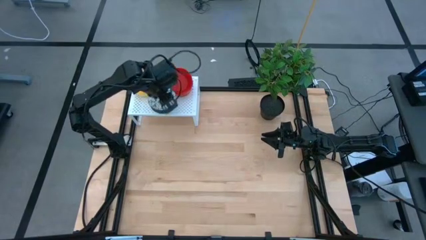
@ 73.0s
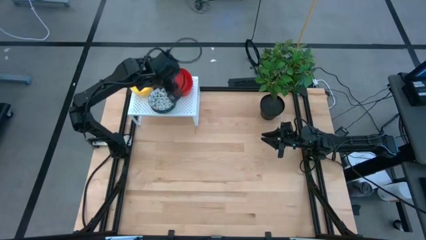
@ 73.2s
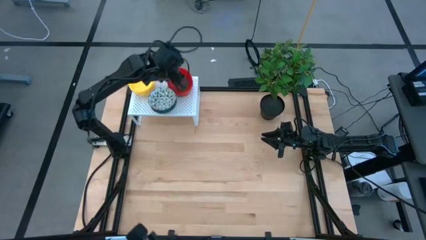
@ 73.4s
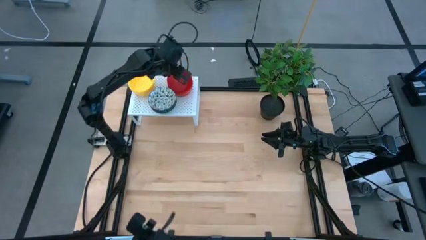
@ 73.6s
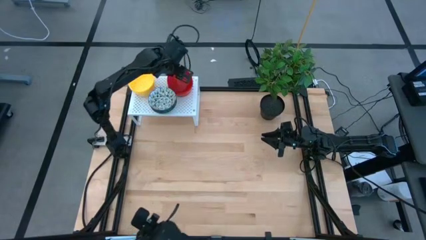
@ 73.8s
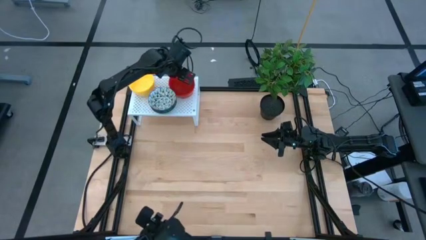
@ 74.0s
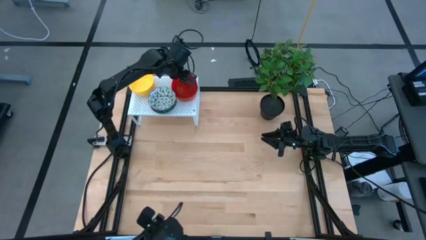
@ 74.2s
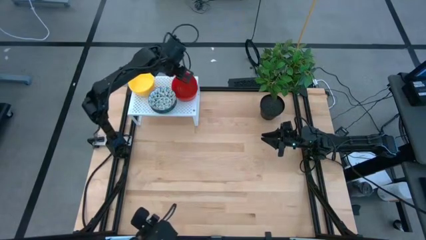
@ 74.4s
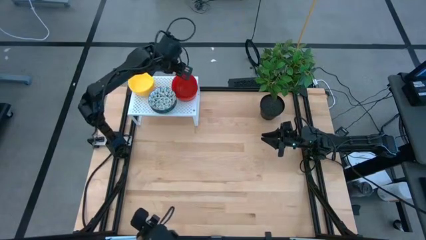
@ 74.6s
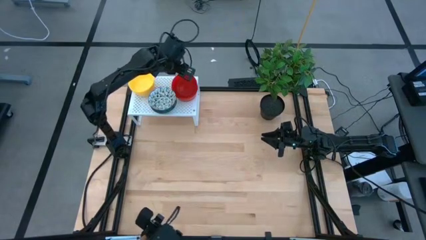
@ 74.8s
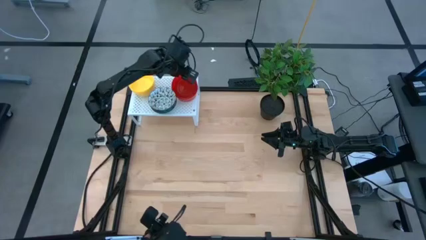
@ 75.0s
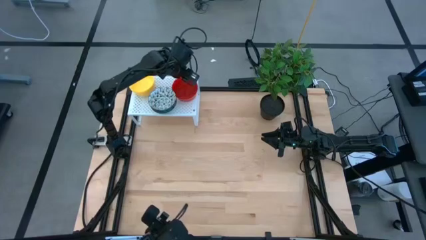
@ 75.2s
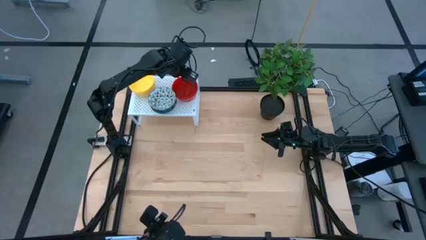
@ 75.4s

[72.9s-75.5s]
Task: Pick & Place Mini bowls
Adjust the red stacked bowls on the shelf

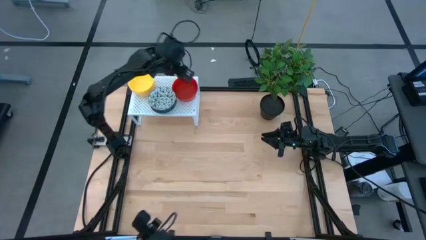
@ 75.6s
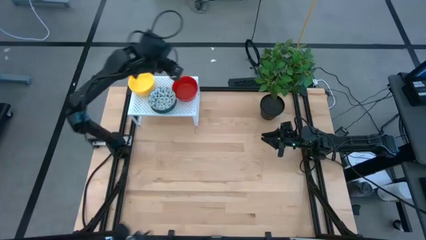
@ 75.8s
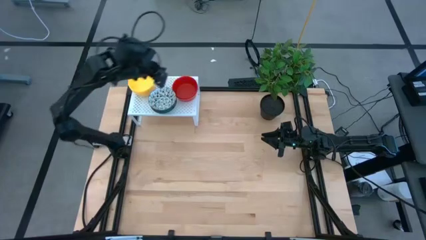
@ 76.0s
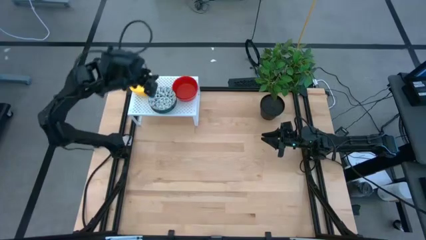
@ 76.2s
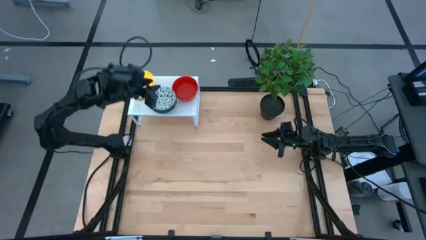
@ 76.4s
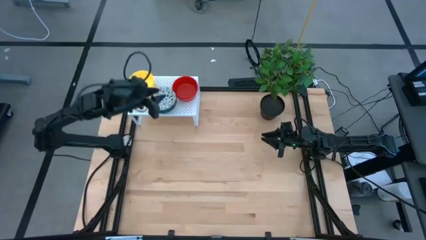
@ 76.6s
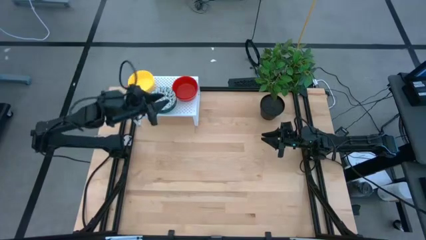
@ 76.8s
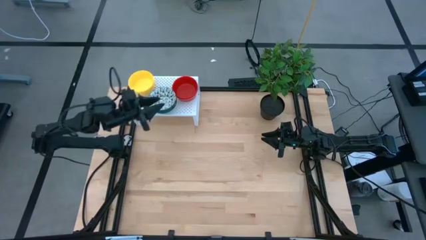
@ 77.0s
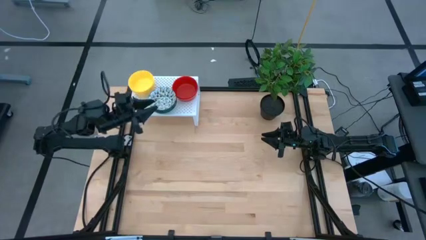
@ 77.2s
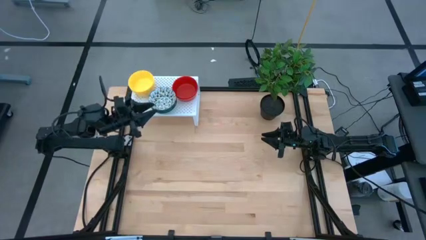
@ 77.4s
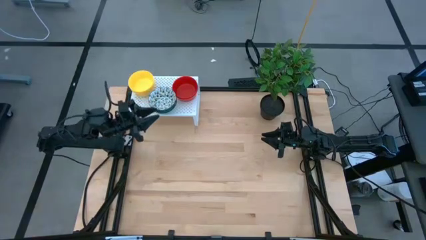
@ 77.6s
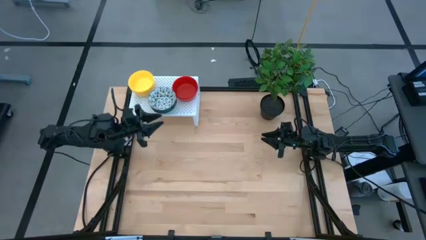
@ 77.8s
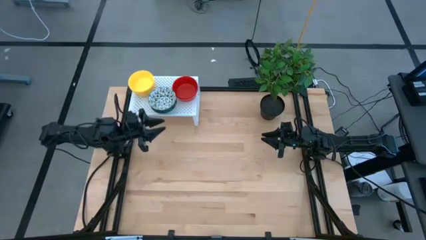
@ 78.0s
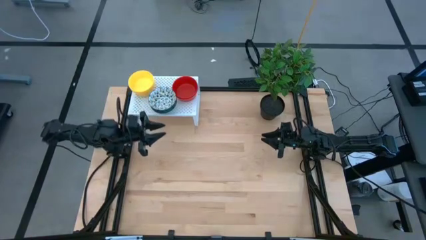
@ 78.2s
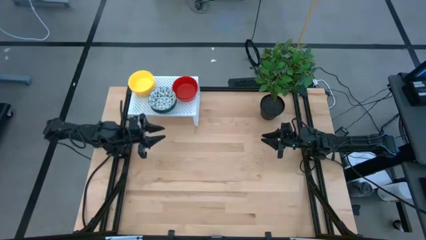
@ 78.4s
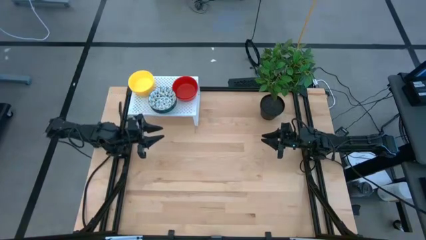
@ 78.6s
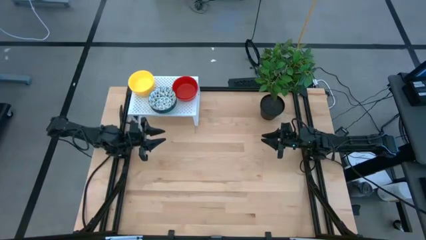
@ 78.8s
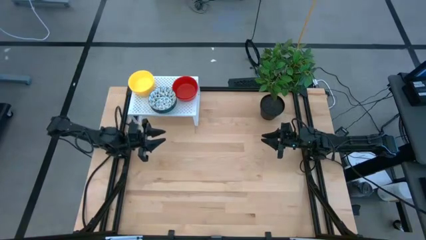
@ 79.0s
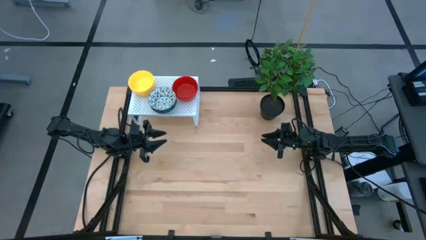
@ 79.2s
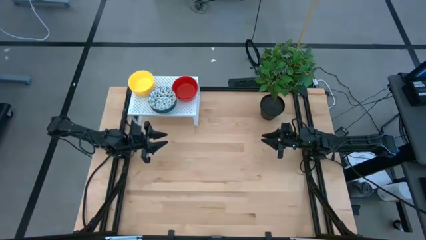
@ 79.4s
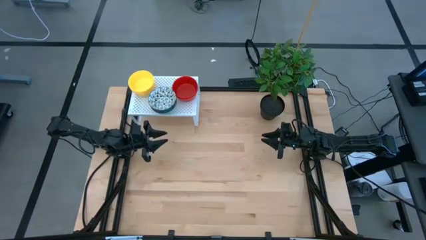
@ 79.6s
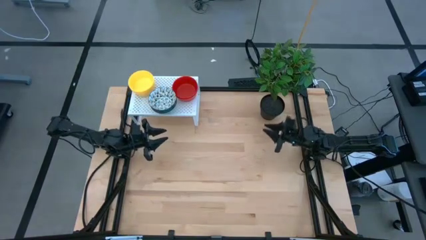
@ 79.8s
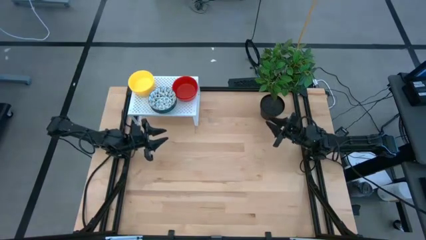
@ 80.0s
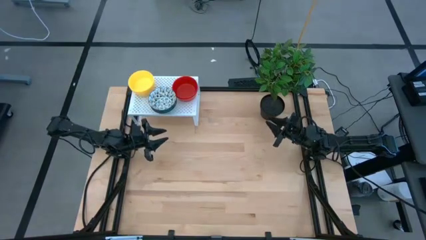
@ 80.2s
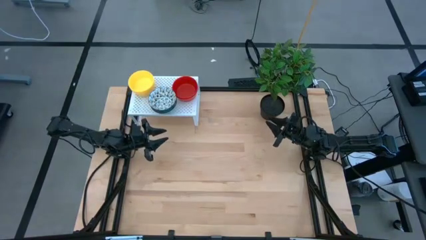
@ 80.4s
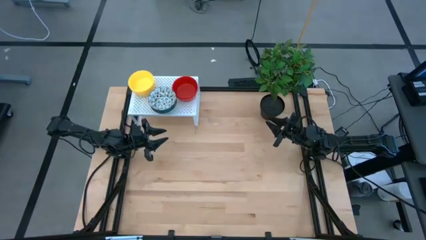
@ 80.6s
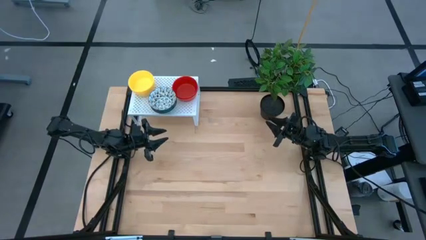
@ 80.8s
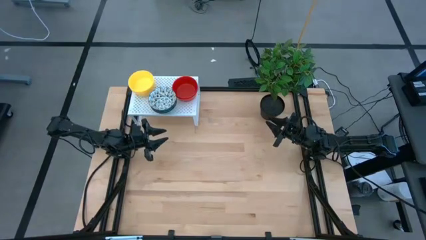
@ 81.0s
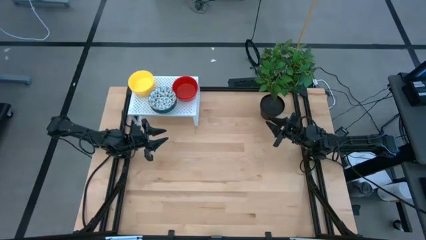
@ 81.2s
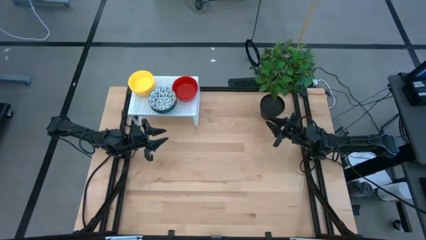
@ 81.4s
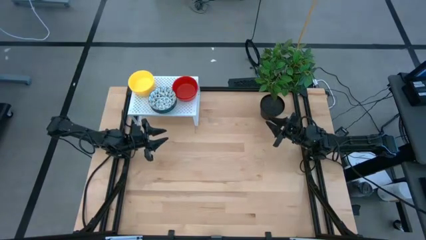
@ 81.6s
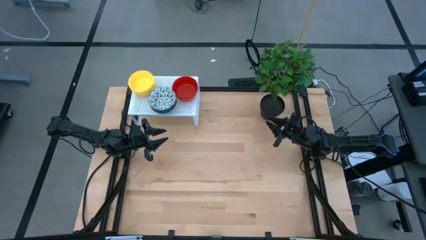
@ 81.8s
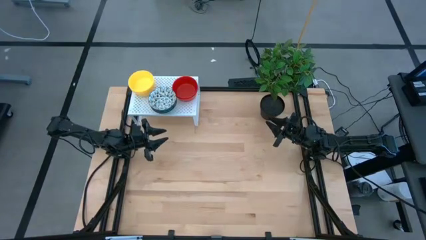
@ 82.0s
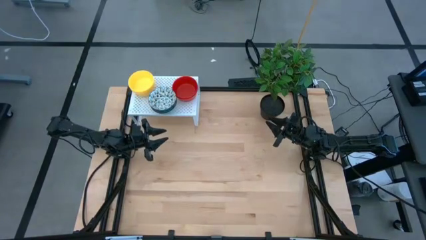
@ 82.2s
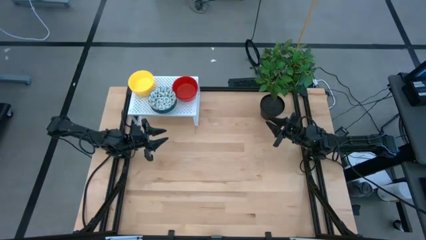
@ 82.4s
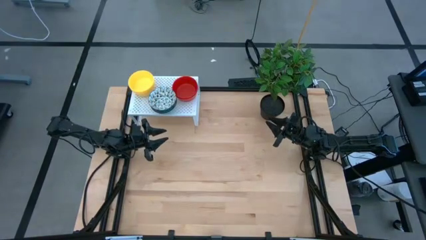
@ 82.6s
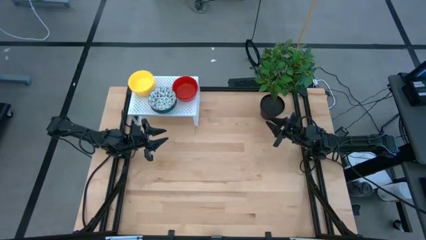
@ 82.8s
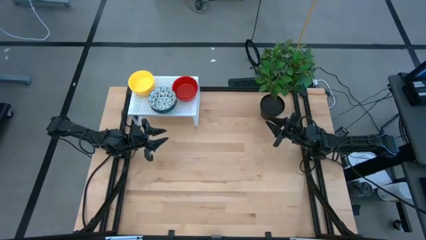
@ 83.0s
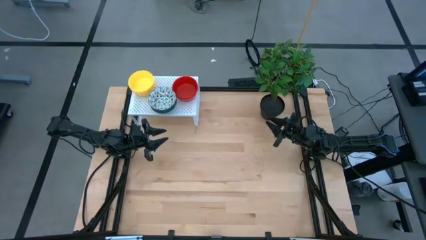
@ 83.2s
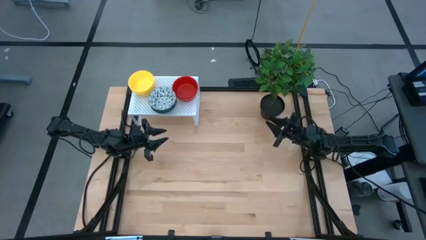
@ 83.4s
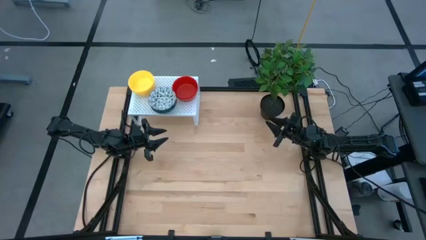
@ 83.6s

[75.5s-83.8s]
Return to Home Position

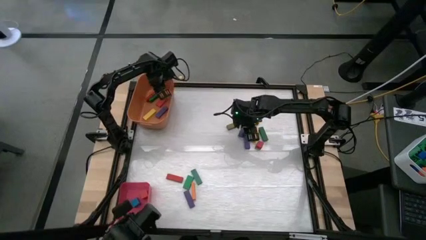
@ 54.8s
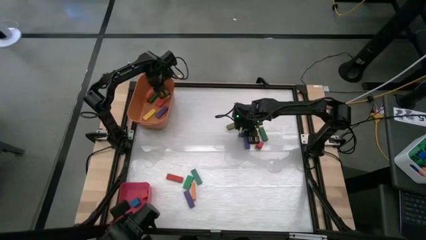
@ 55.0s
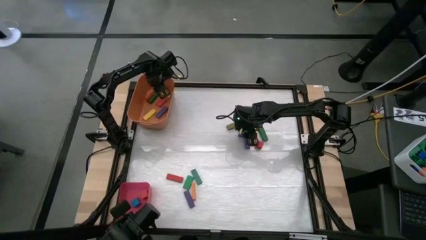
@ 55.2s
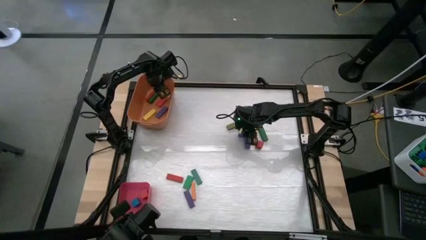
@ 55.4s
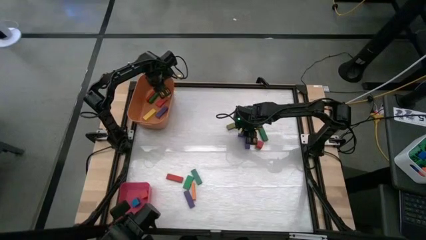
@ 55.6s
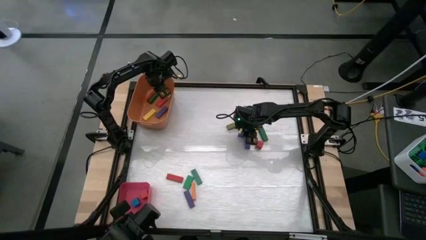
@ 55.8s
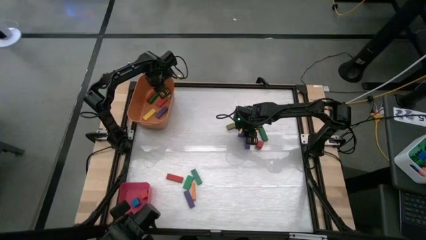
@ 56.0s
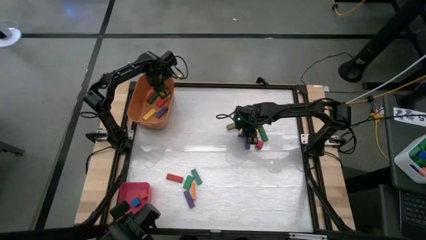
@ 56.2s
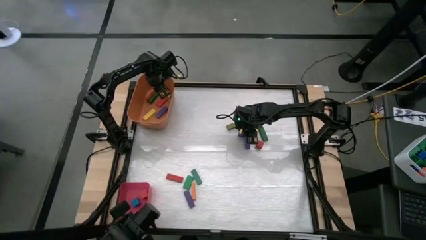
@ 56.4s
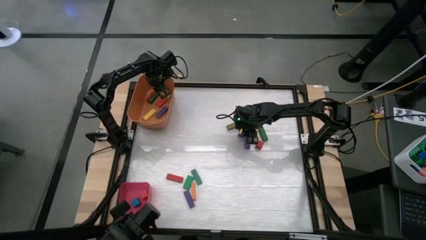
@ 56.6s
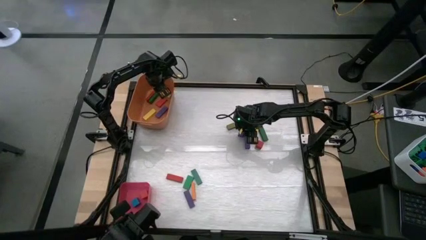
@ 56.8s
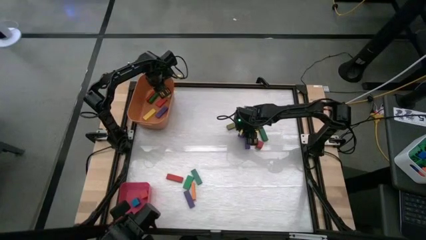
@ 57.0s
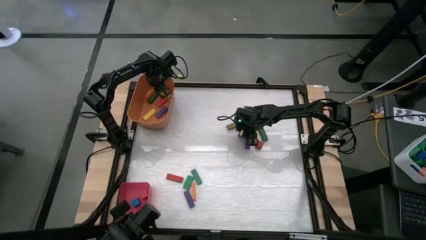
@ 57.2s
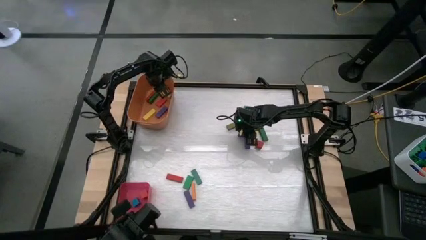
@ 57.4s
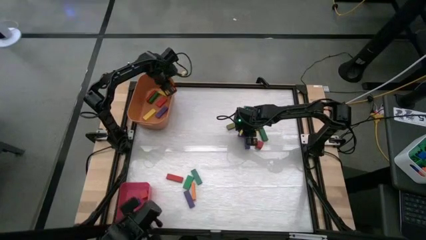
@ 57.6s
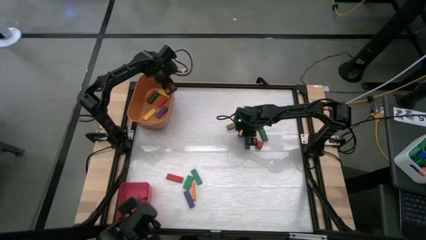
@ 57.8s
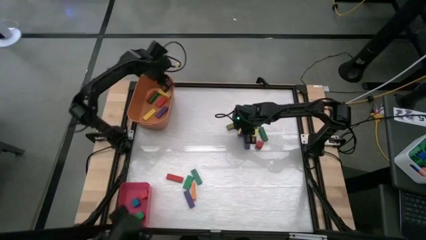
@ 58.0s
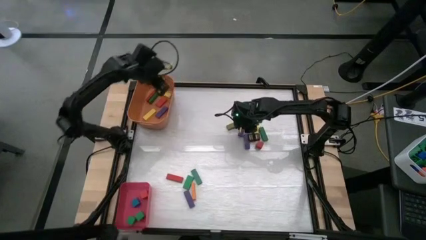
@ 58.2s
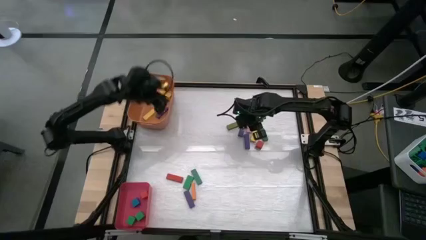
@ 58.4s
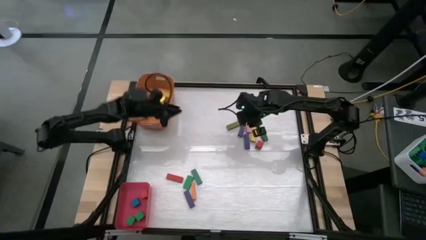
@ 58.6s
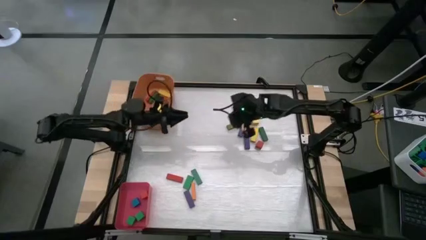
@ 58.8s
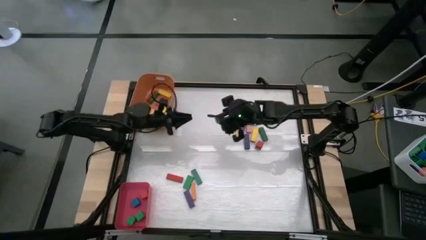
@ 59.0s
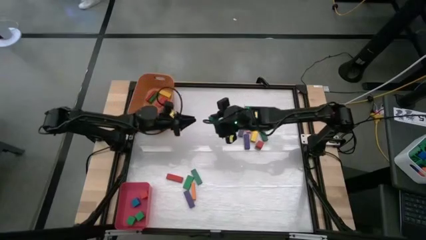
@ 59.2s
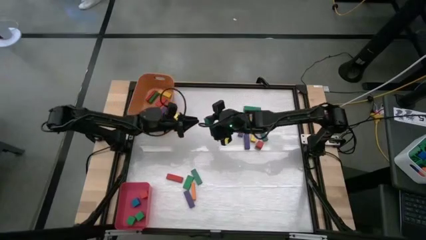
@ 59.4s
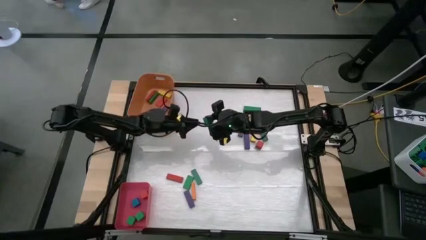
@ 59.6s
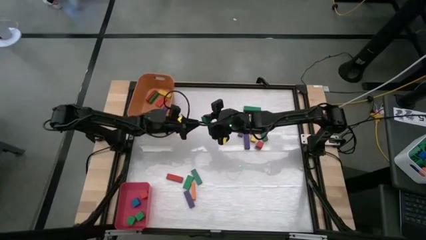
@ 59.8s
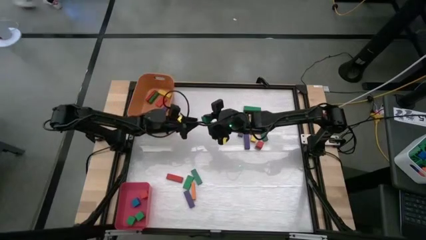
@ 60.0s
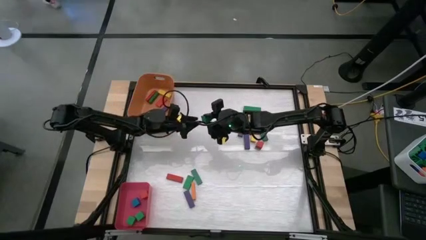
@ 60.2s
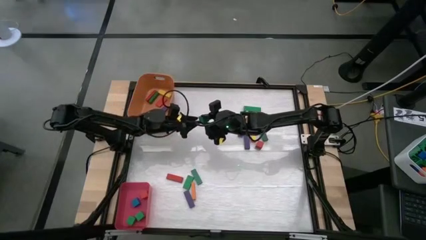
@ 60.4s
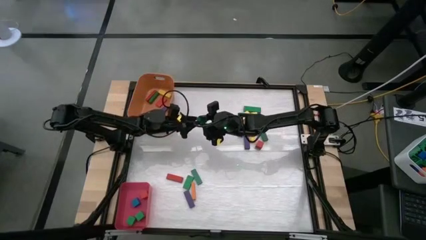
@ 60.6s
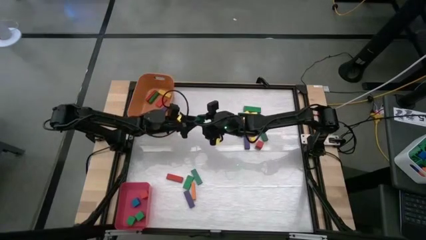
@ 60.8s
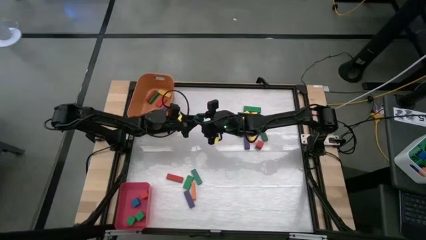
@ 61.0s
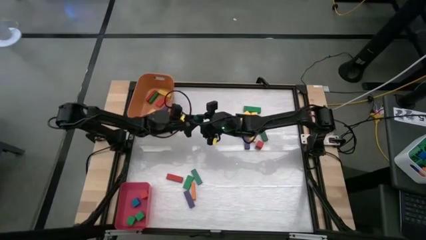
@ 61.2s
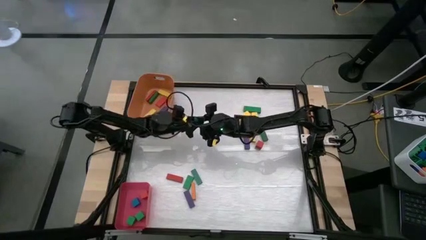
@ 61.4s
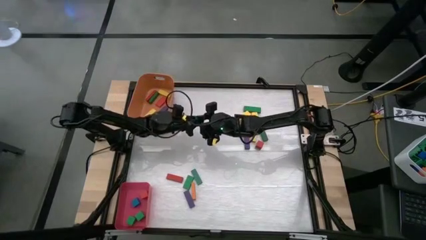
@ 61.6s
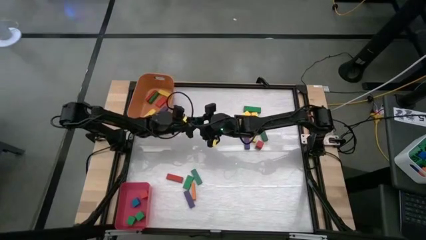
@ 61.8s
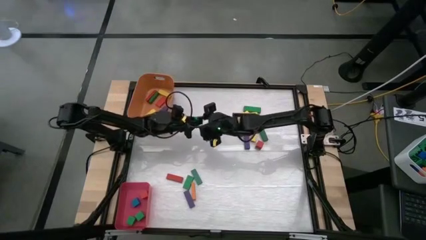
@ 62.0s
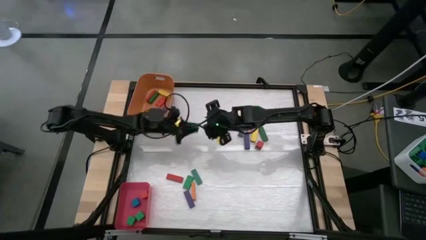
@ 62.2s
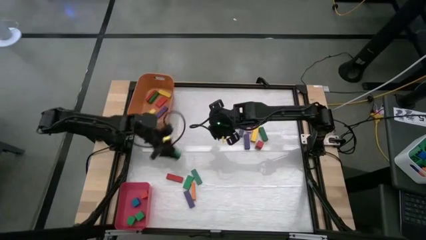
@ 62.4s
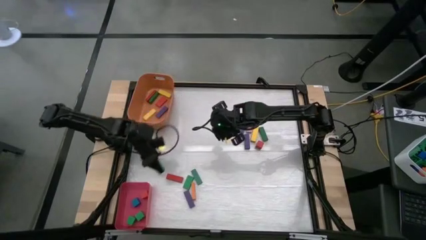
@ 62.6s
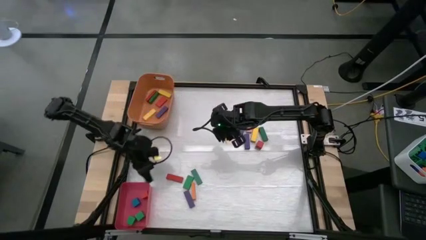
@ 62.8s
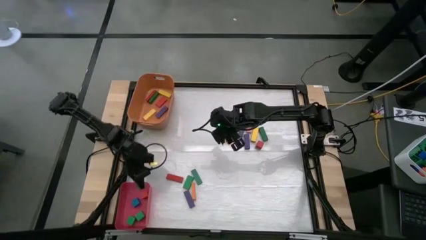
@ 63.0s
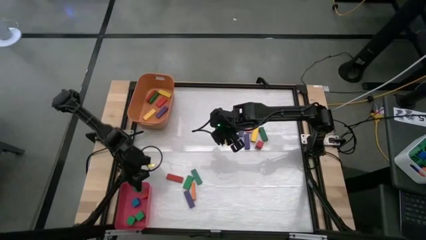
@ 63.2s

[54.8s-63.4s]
Task: Sort blocks by size
Put the small green block into the red bin
